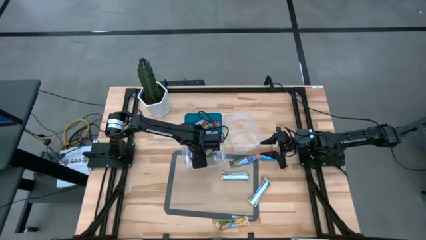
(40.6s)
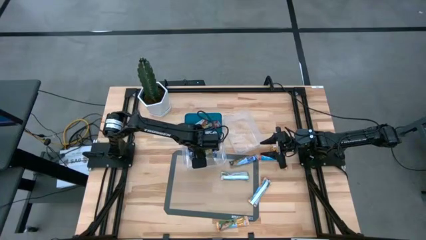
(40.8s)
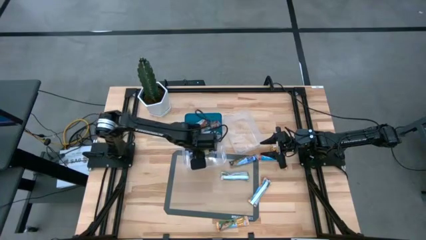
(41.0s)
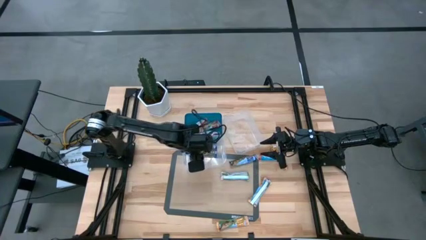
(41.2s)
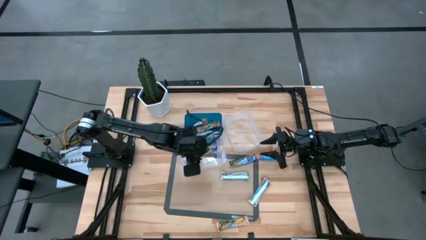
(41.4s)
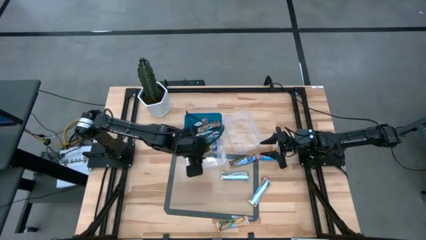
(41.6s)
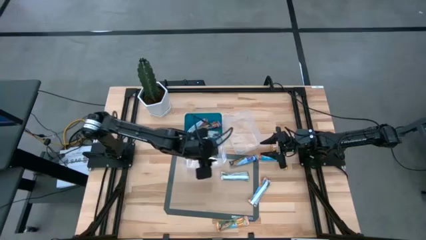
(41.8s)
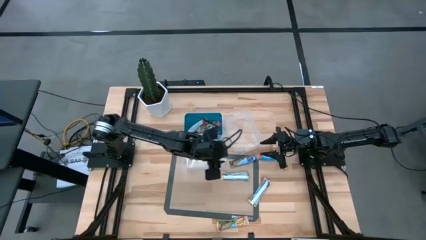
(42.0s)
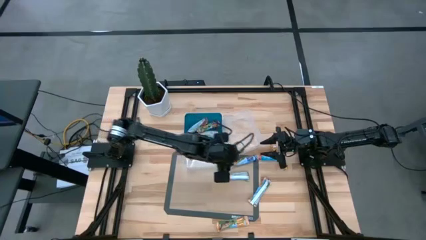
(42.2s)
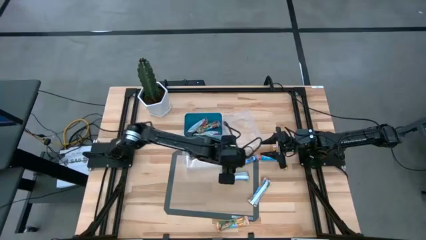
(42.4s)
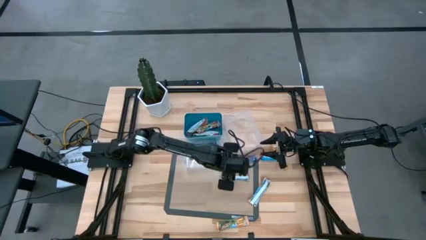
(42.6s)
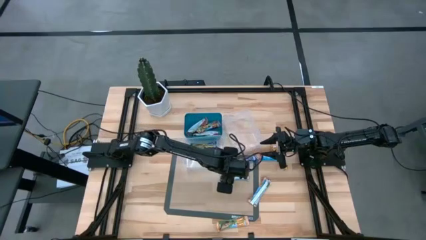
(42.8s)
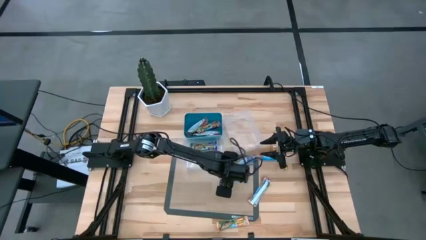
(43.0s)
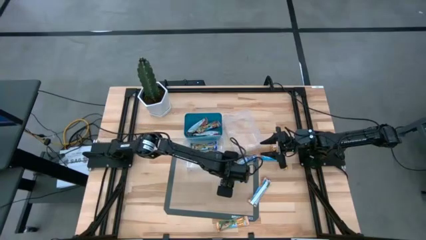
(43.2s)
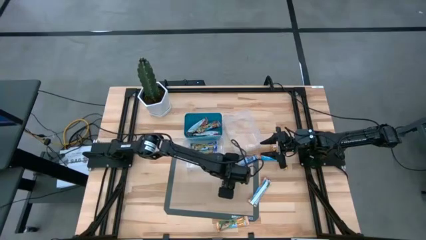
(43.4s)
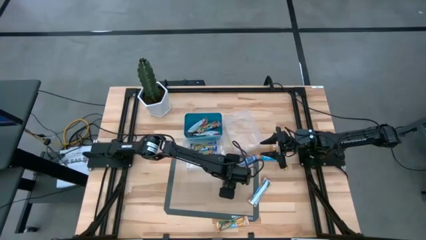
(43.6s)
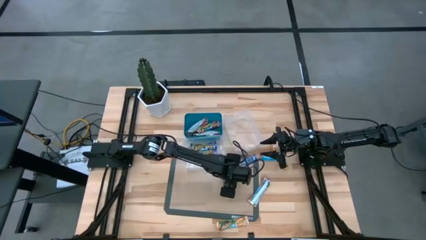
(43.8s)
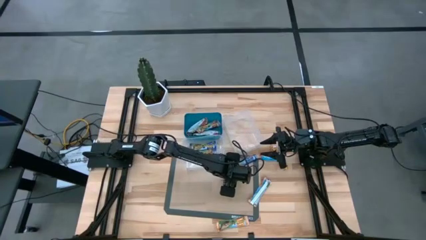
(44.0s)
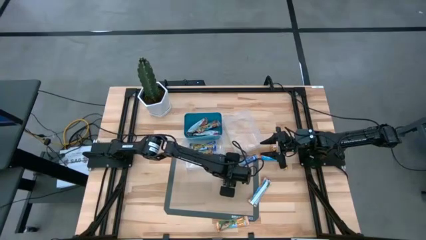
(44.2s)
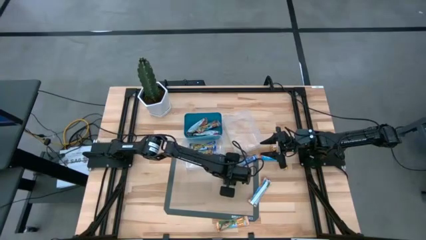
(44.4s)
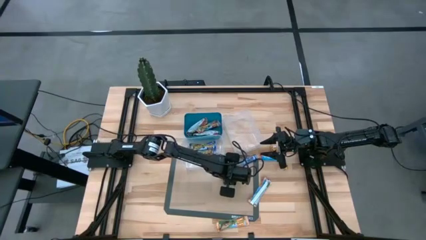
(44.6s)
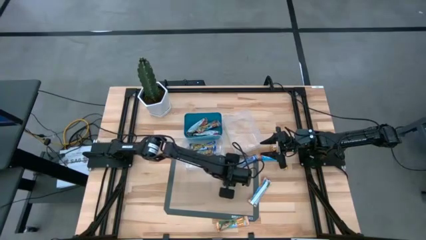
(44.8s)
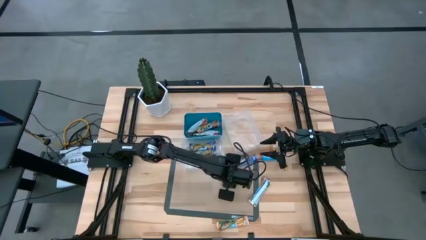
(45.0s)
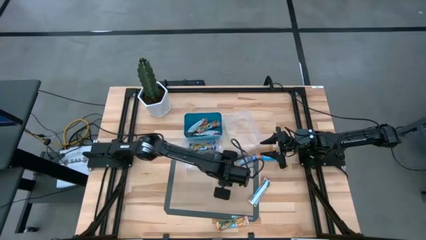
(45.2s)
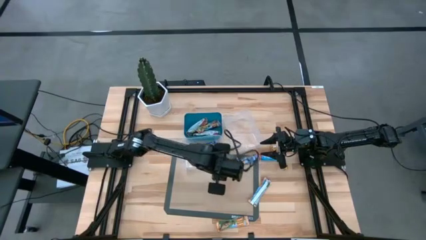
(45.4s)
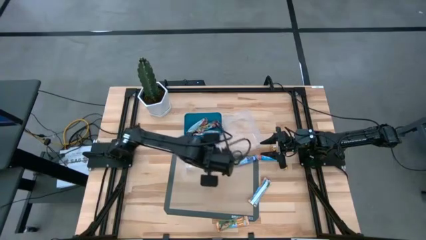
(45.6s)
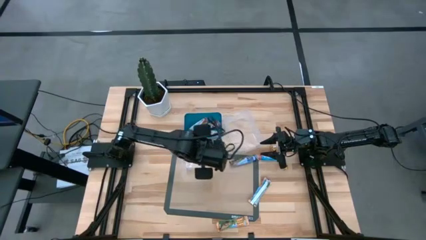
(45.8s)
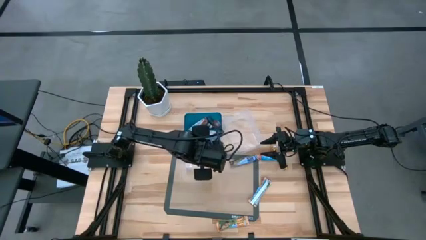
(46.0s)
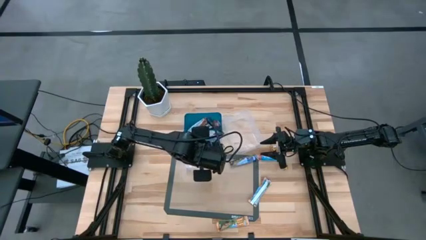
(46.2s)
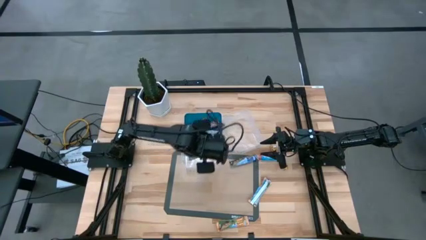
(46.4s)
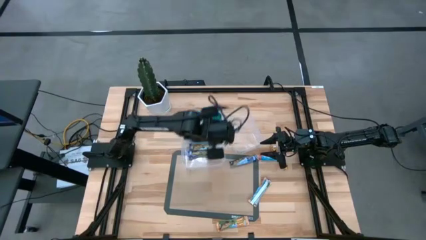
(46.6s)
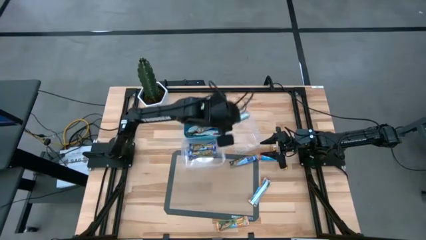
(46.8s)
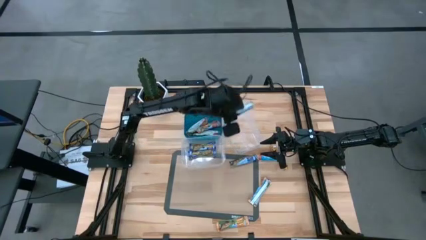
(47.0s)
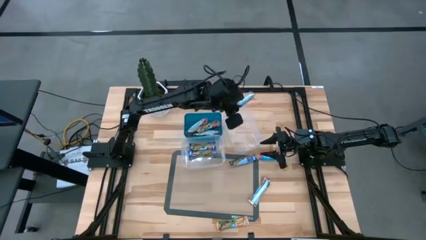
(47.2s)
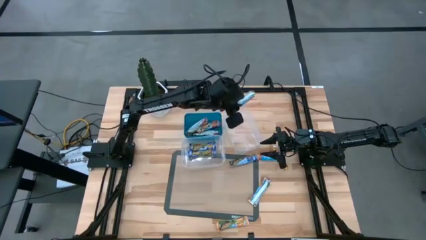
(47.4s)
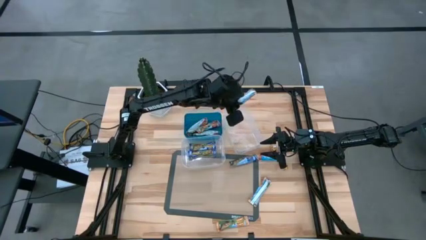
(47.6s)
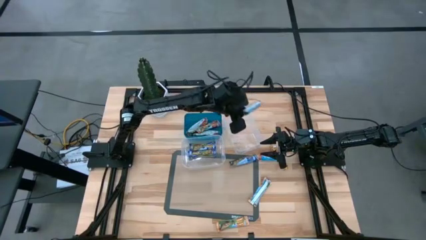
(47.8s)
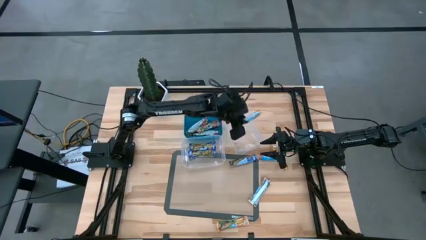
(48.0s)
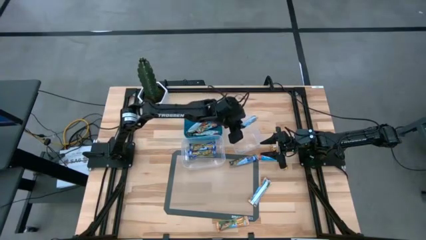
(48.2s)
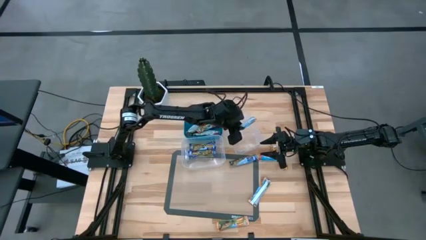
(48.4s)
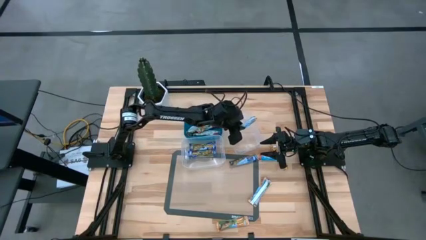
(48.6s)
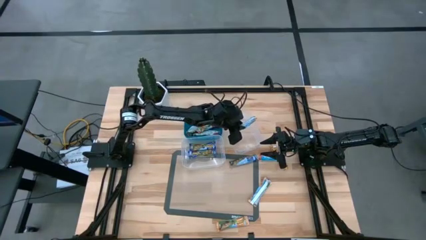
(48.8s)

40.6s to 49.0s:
Task: Pick and place Granola Bars by type
Put the orange granola bar into the right transparent bin

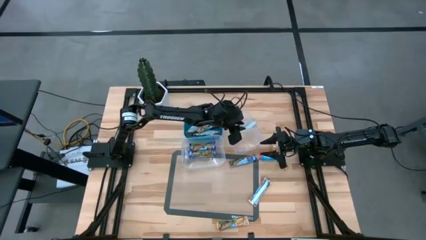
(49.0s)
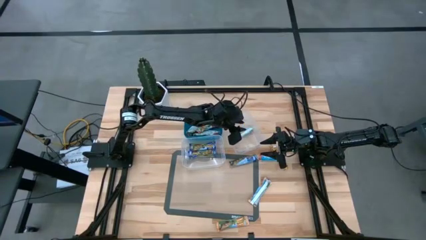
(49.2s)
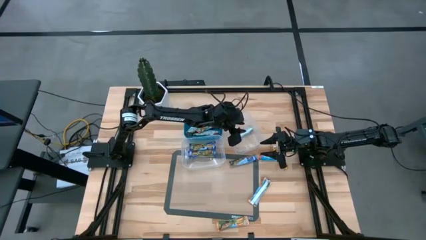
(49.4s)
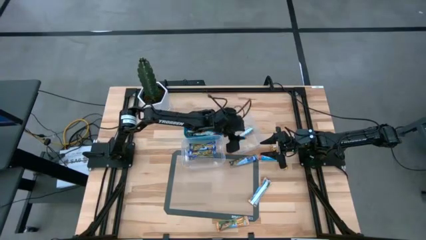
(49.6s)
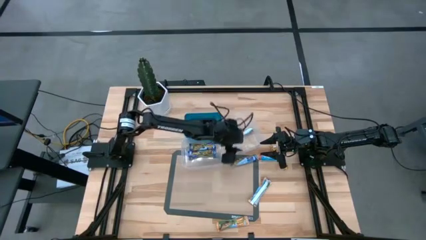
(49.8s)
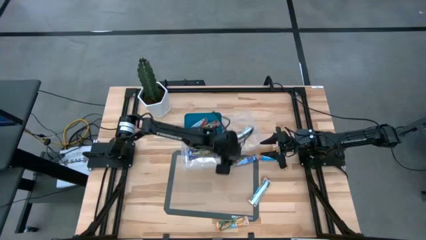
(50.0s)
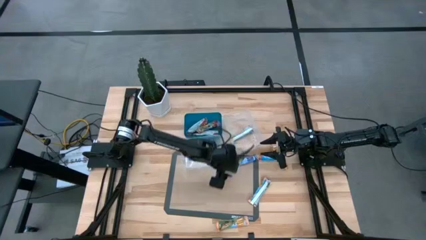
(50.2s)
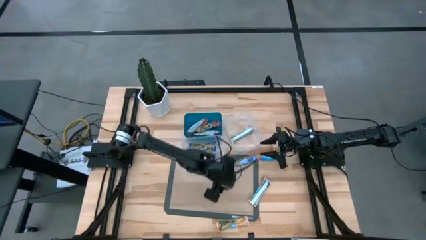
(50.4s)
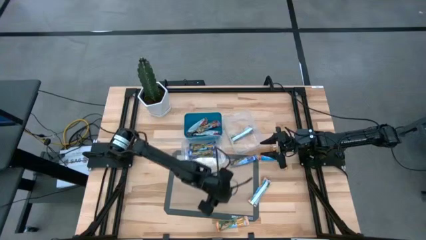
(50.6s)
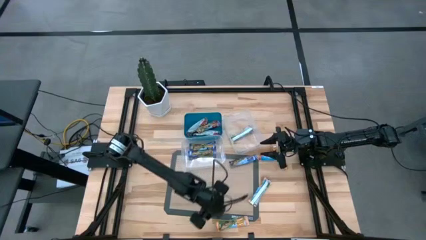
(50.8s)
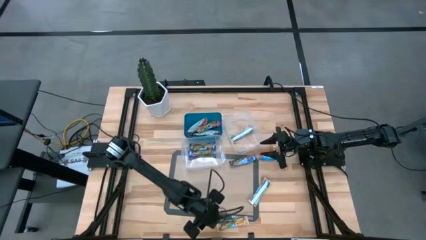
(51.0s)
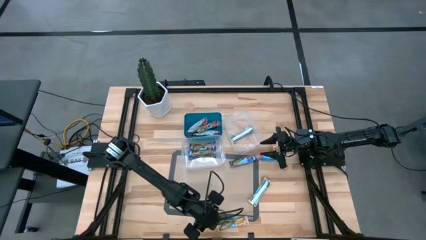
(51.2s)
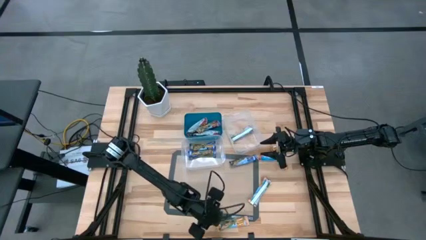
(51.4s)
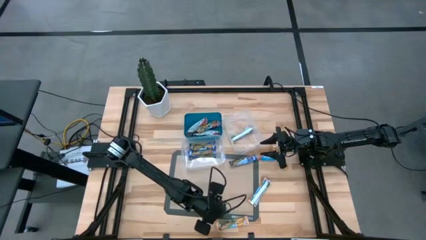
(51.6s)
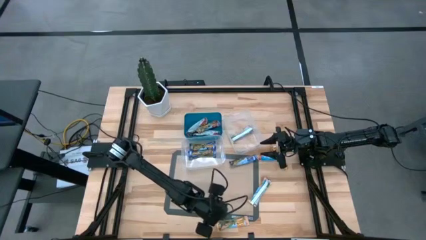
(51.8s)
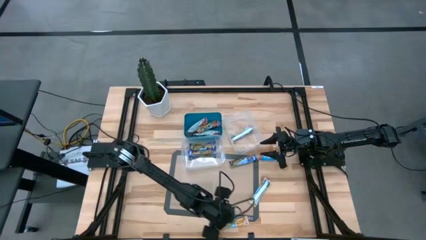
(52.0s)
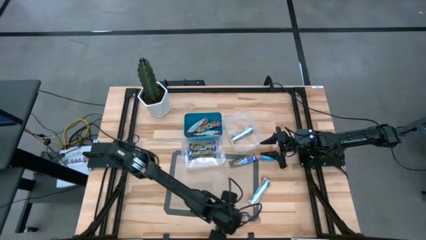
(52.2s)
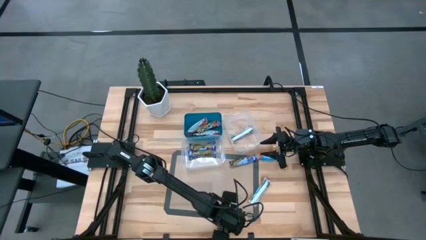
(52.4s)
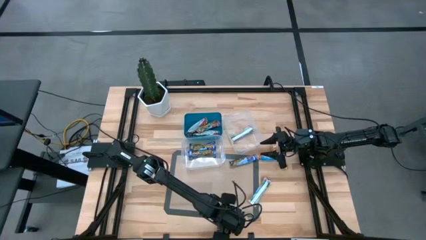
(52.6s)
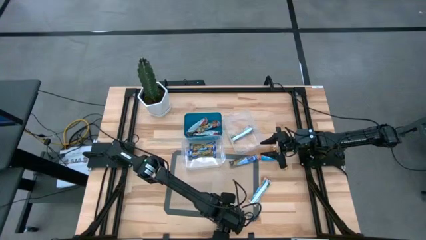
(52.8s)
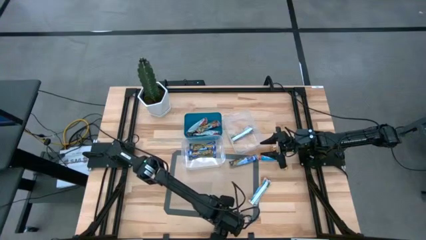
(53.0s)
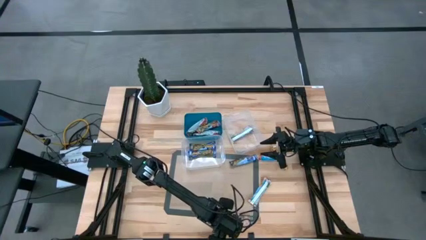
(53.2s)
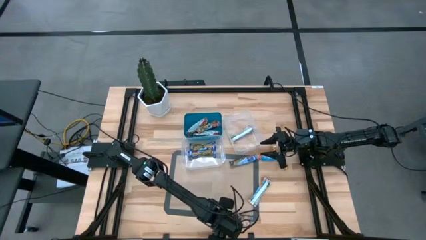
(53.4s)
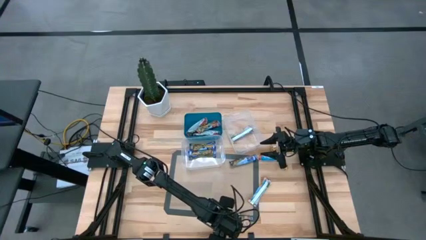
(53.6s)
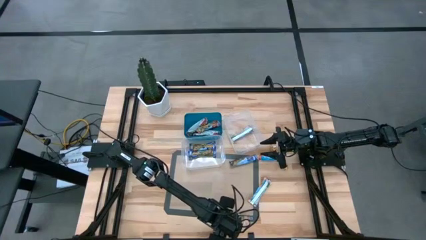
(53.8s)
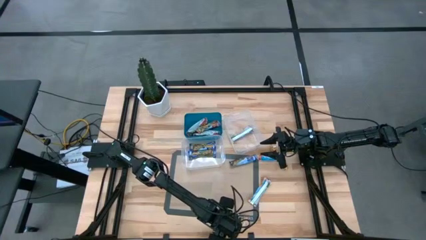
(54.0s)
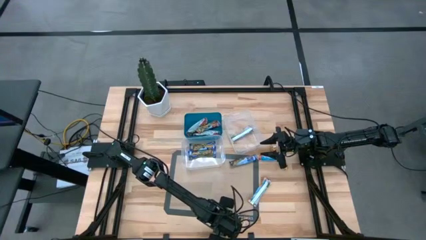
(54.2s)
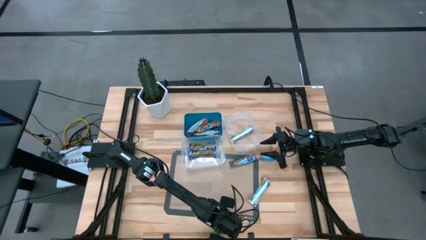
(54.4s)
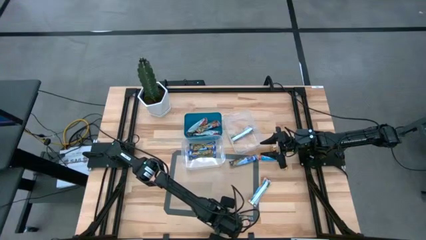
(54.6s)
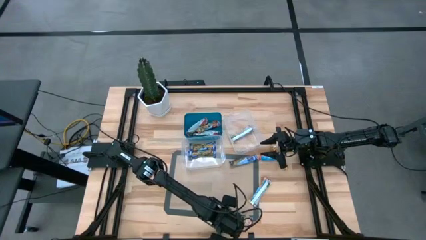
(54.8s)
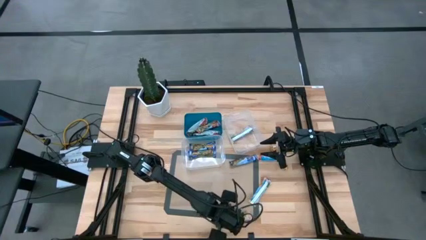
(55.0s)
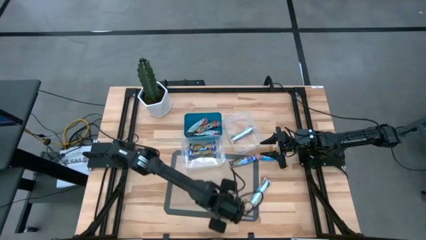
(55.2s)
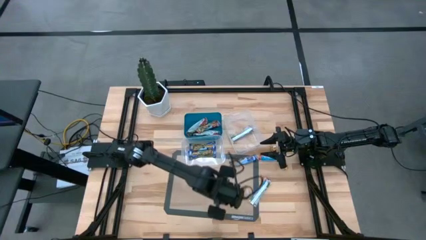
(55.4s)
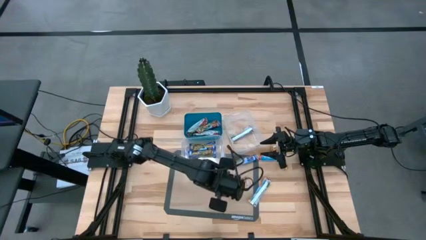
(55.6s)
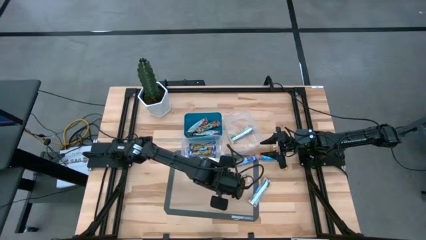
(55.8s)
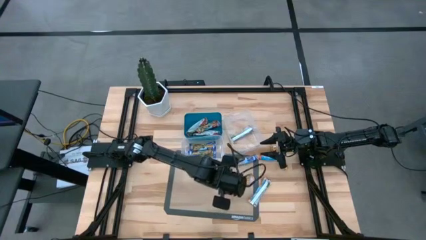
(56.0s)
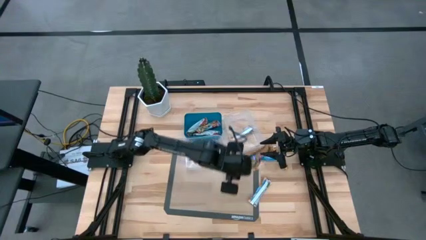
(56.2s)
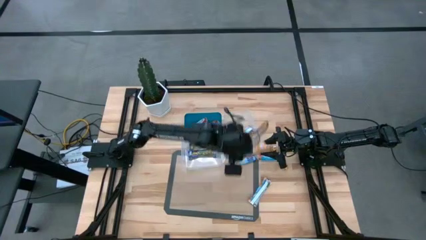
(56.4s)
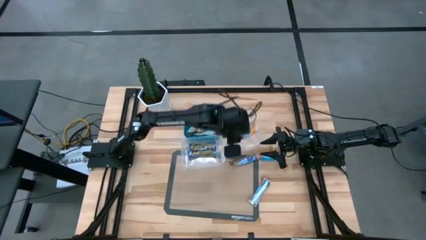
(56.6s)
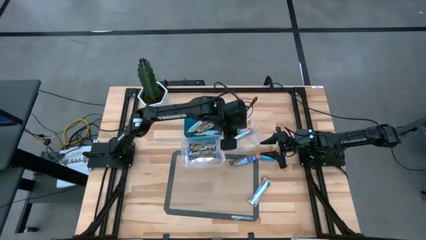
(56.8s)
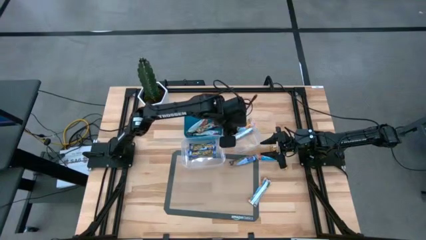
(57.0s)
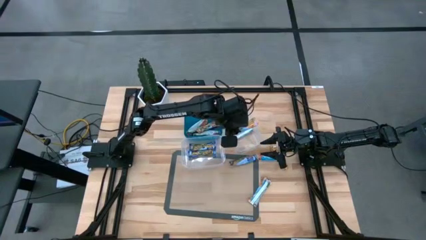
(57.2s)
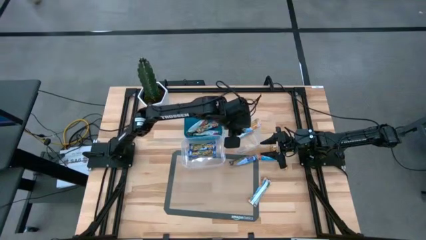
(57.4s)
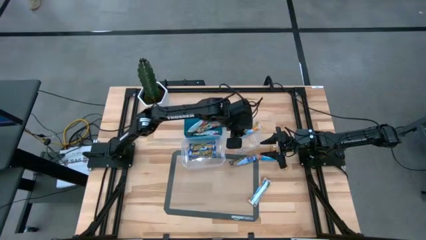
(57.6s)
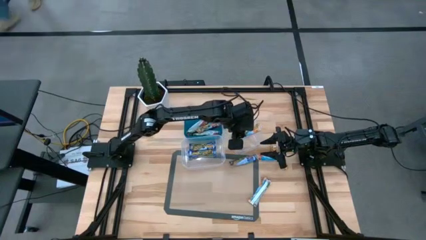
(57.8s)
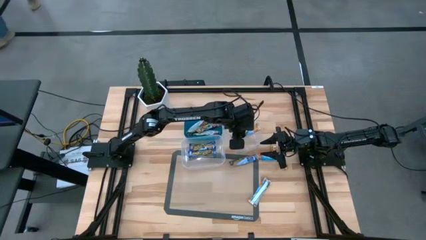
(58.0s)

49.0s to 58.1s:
Put the orange granola bar into the right transparent bin
